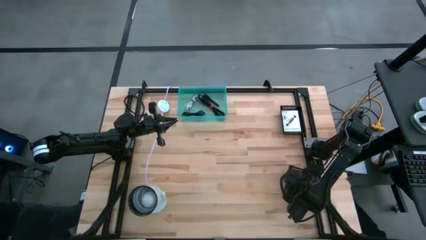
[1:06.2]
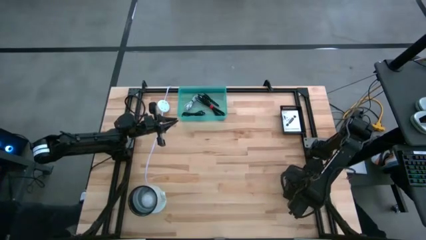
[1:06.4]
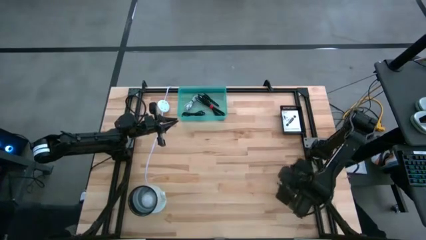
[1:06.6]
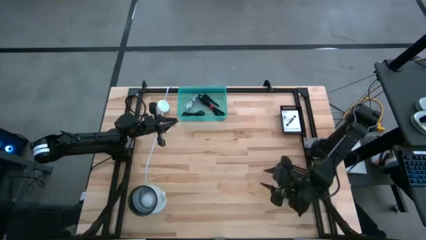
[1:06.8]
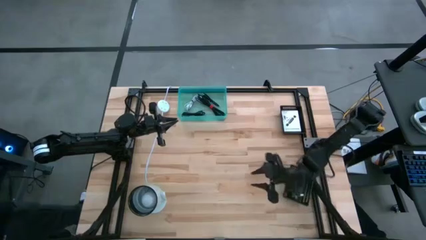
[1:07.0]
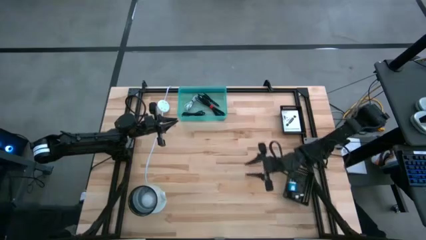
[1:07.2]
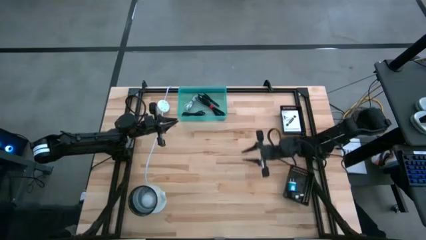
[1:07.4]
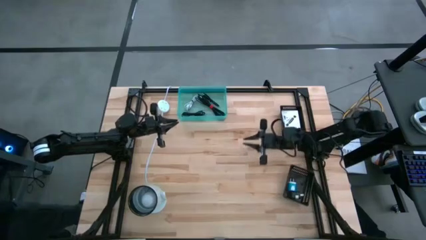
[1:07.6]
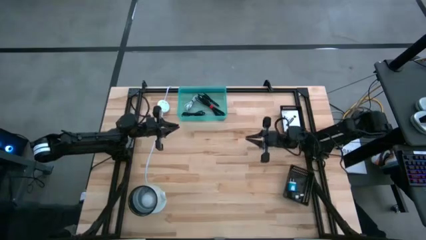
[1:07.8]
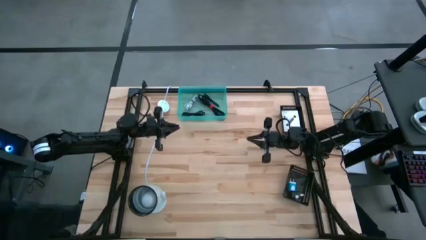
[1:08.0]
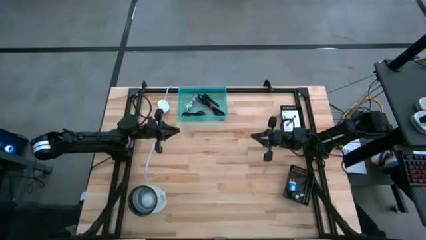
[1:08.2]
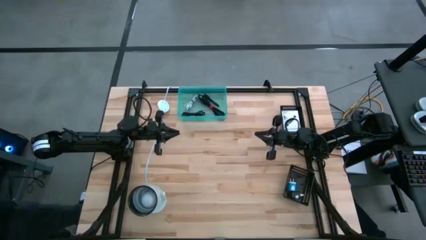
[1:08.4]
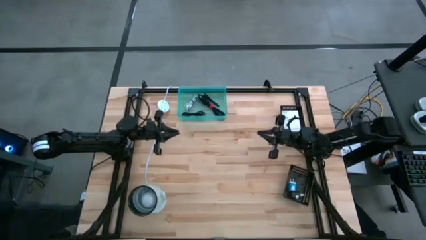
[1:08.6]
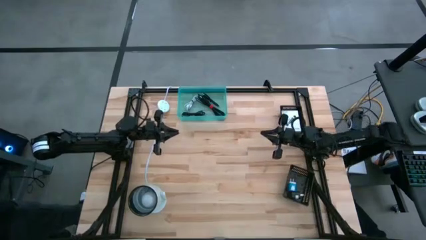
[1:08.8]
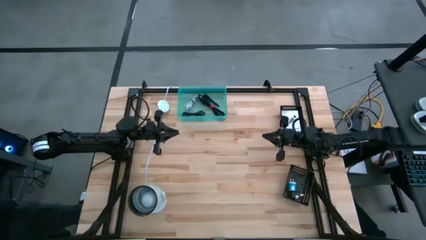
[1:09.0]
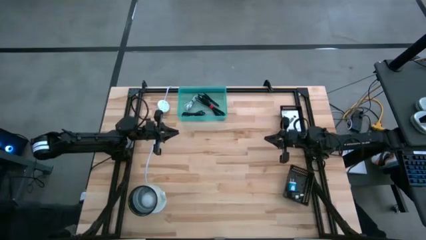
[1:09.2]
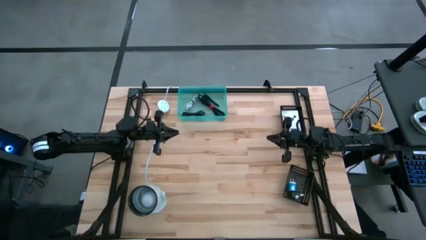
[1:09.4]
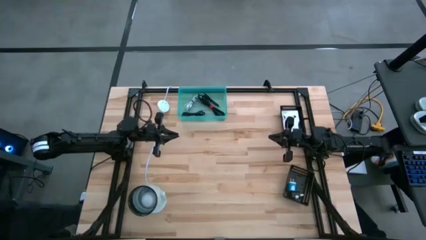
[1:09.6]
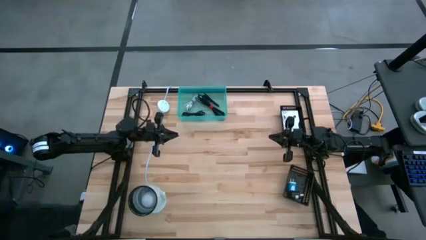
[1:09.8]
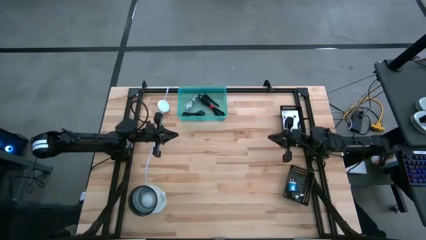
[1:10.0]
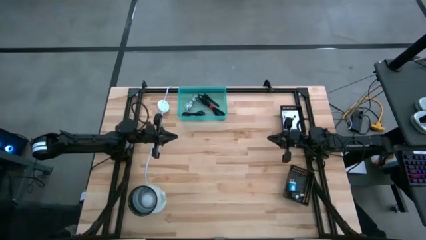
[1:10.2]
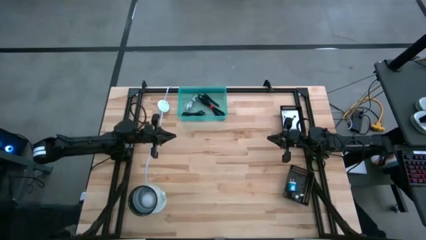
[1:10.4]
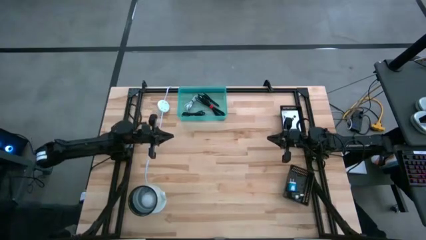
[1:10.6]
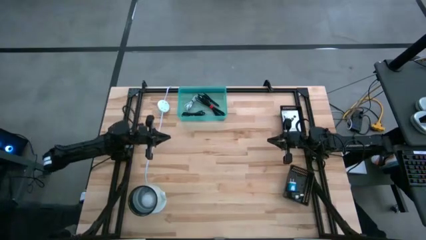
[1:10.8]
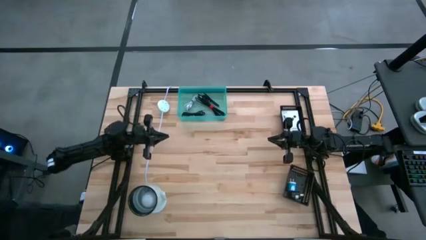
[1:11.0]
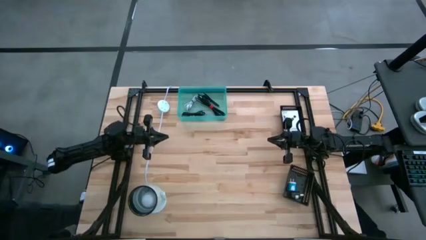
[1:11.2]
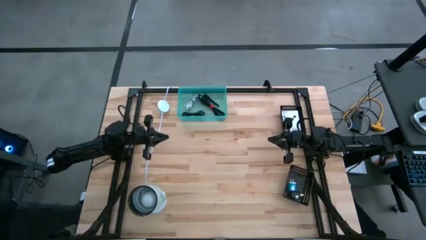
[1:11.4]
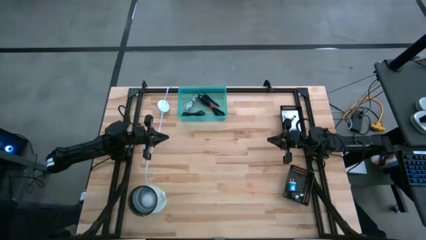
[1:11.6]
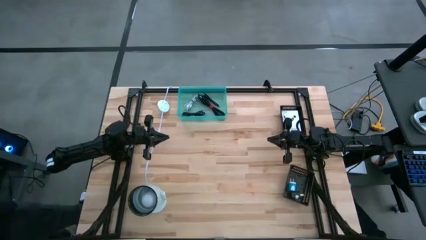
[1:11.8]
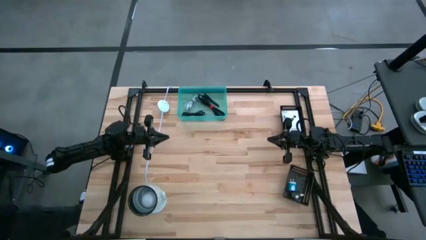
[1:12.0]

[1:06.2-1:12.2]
Task: Pick and place items into bin
Return to Home Position

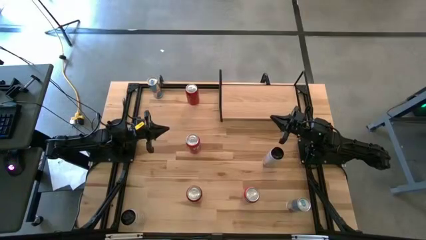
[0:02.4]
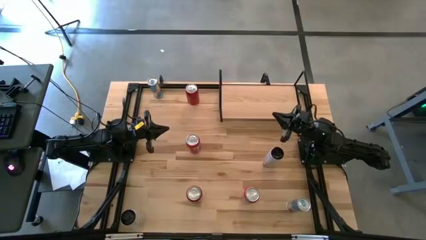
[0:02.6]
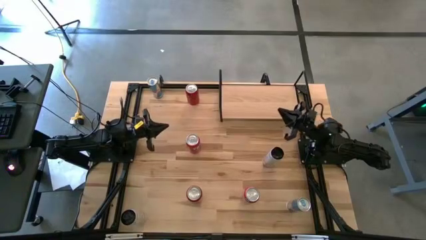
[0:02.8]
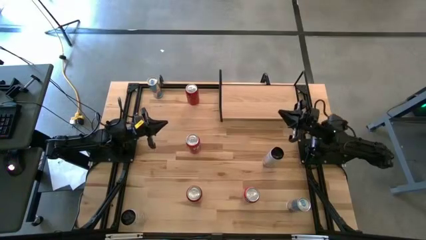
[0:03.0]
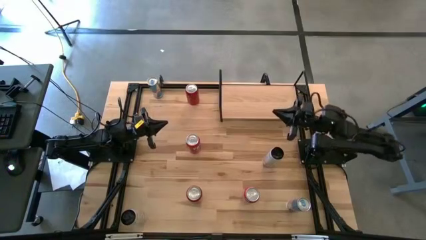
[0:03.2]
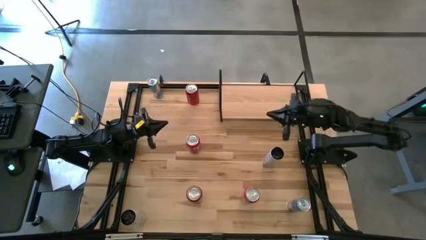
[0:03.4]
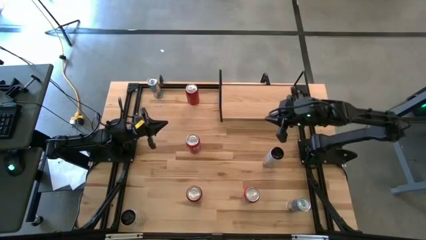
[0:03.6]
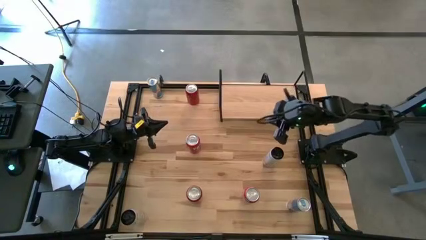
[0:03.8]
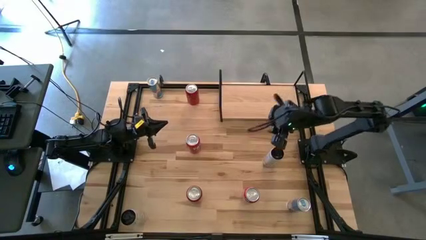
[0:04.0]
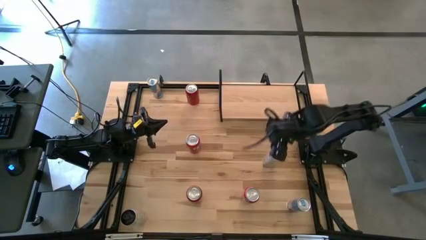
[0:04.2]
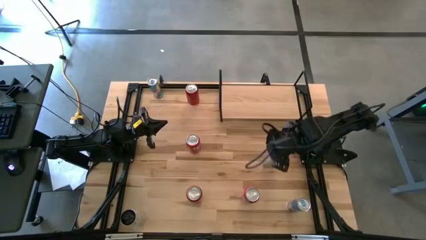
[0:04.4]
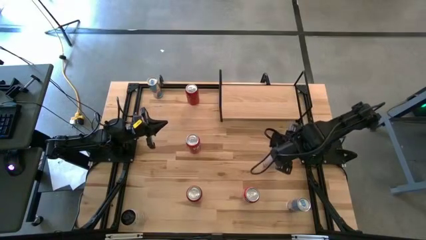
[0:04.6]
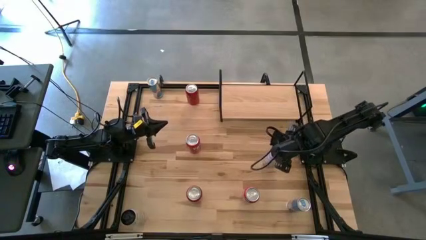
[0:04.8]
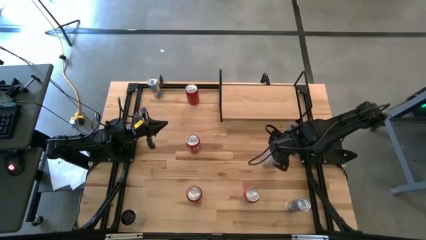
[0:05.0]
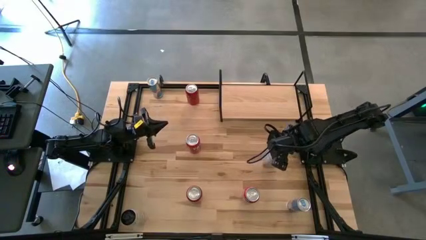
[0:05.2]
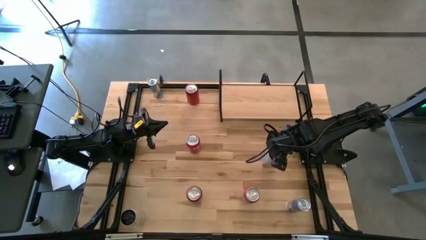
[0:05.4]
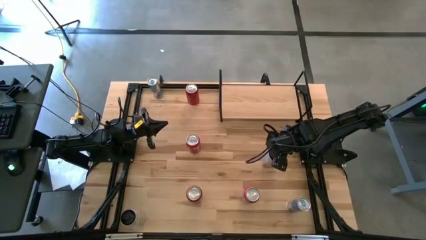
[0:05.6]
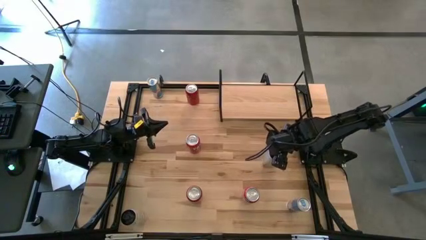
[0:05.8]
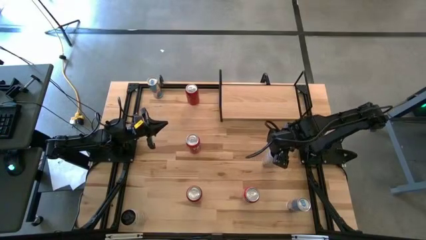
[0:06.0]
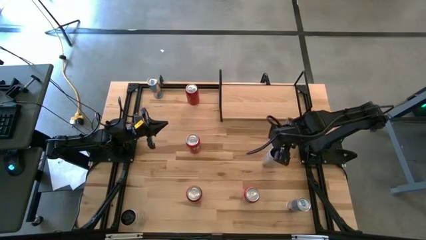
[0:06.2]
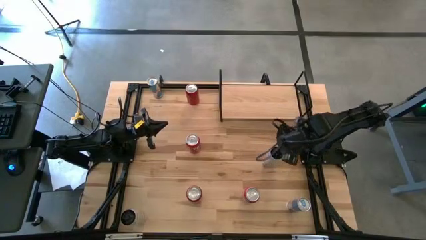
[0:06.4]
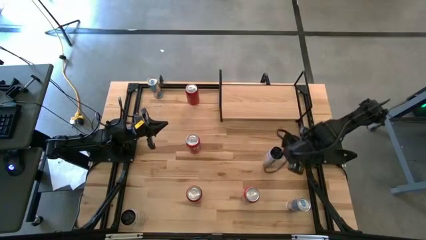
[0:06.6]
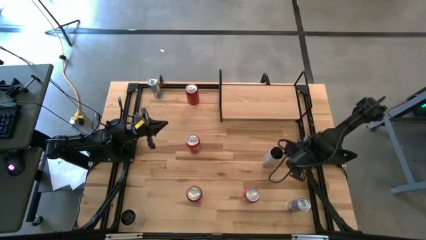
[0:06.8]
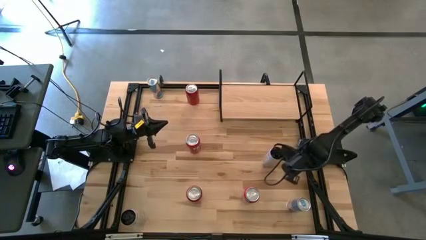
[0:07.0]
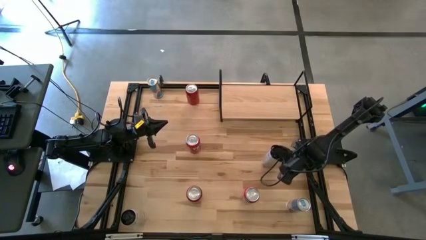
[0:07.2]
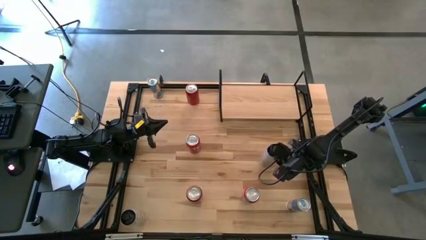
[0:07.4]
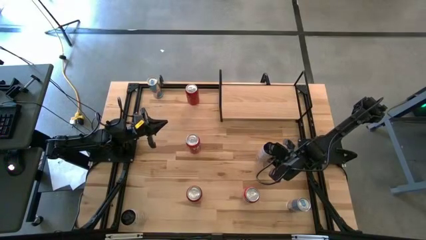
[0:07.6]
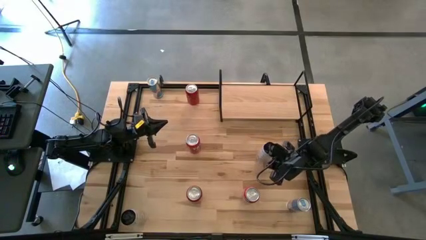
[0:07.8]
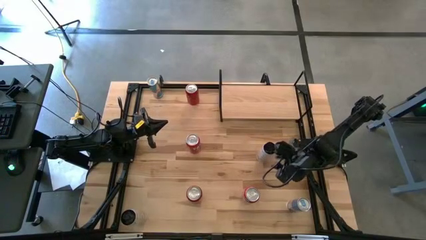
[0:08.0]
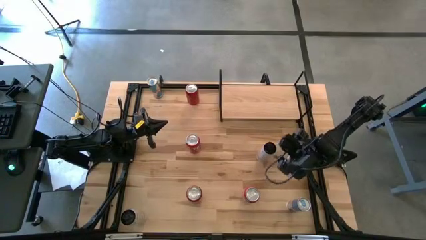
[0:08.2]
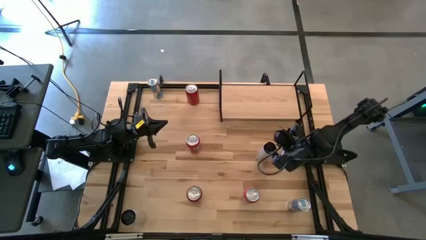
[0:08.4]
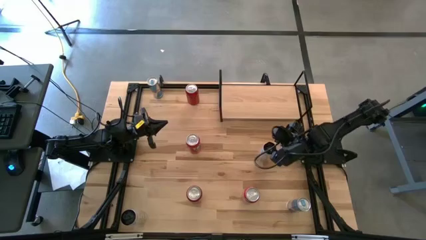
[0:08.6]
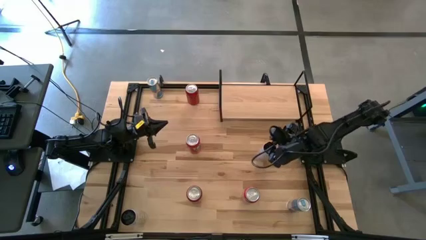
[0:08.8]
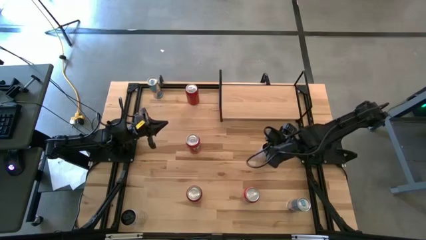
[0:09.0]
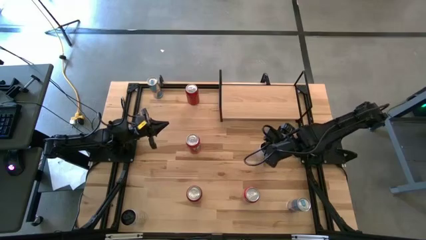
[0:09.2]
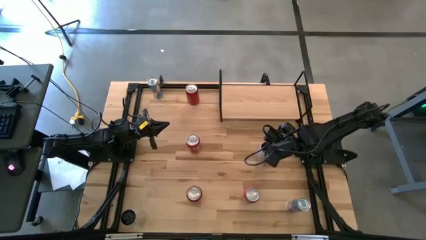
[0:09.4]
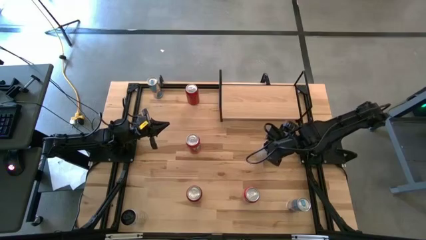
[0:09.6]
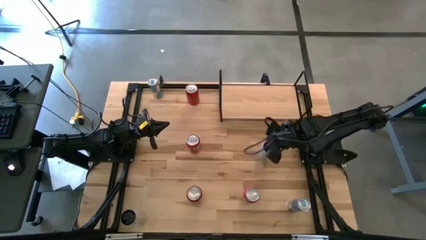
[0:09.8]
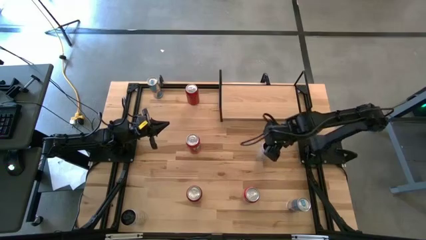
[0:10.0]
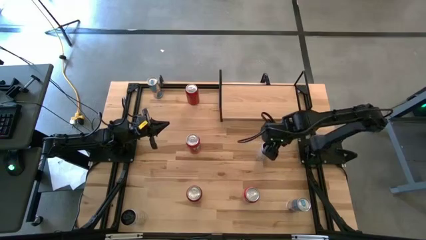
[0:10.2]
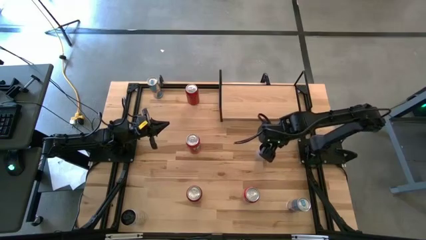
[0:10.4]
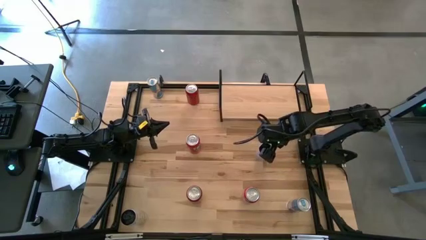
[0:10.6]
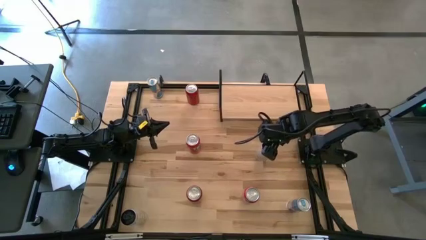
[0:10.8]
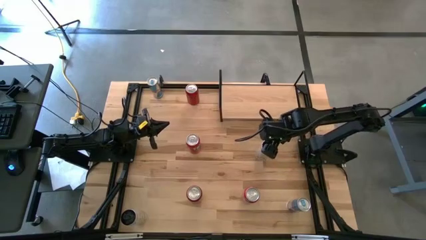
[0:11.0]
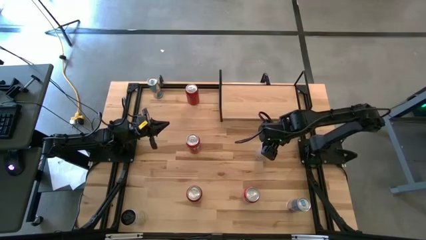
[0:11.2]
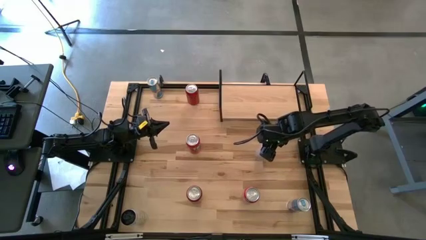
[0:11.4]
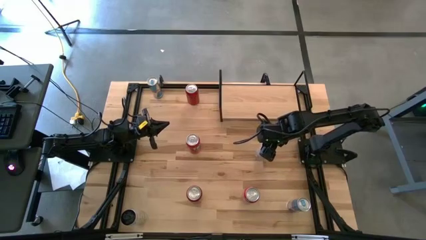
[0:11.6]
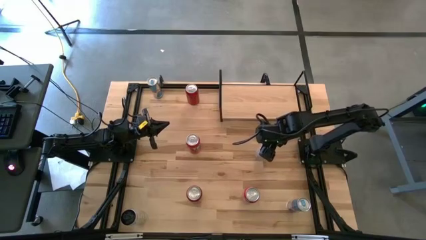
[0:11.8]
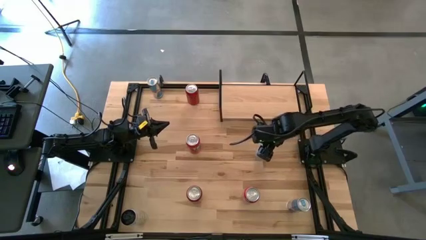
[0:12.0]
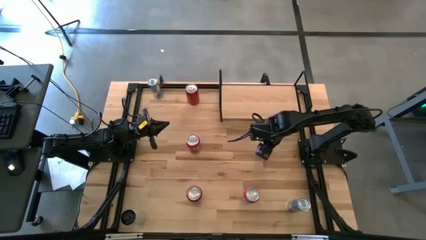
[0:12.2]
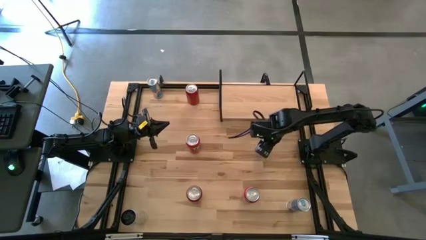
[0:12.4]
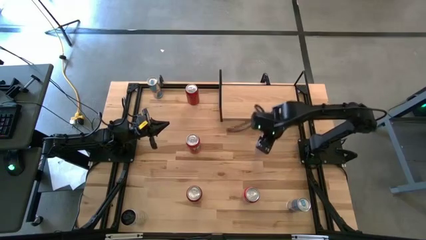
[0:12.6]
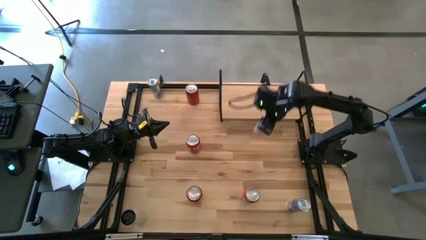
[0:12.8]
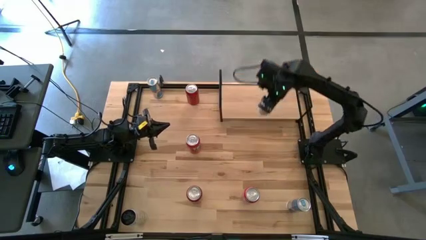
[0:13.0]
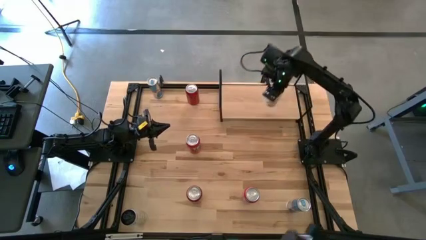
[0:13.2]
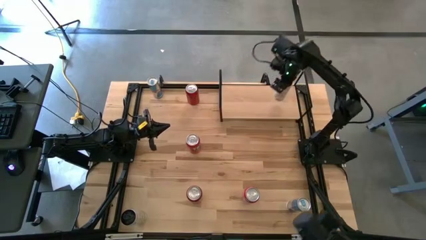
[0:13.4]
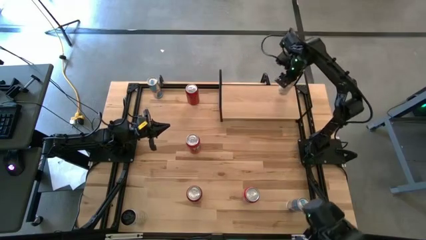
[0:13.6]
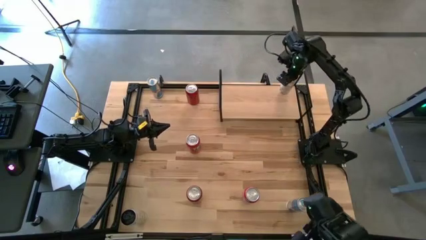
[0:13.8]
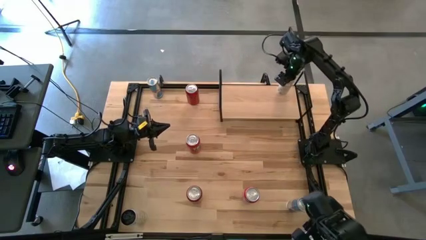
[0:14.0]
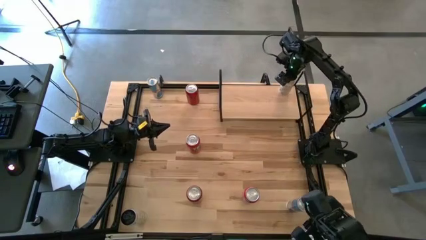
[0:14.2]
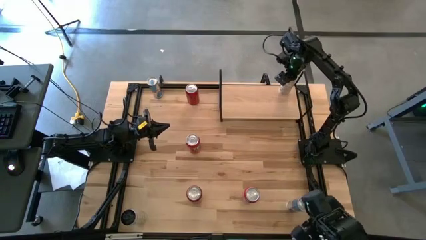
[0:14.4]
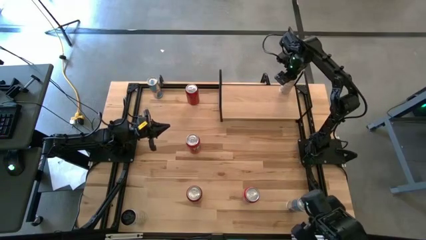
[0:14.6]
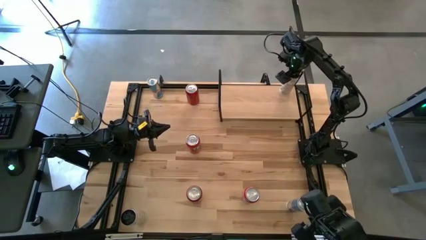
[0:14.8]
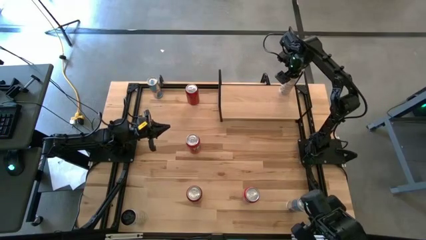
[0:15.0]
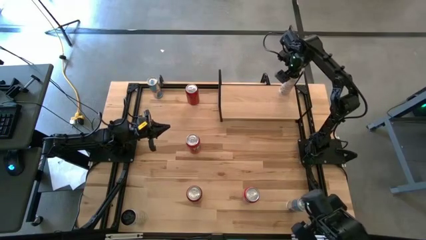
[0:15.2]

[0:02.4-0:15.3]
Task: Place canned beverage on shelf
Put the top white-yellow soda can on the shelf
